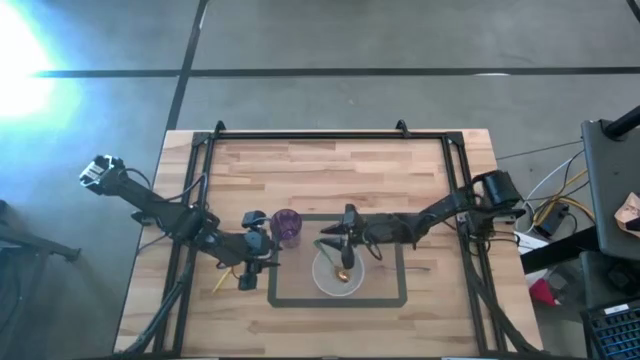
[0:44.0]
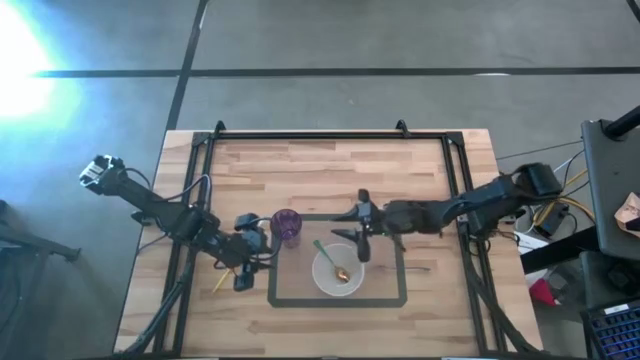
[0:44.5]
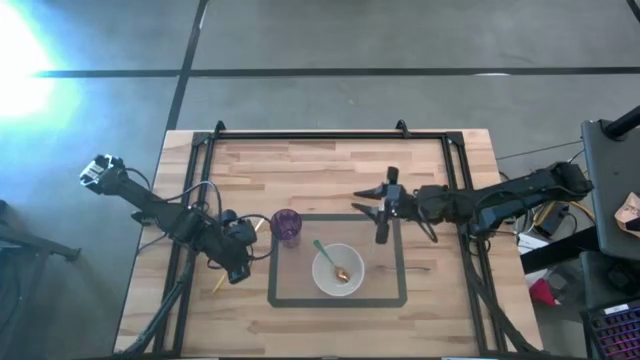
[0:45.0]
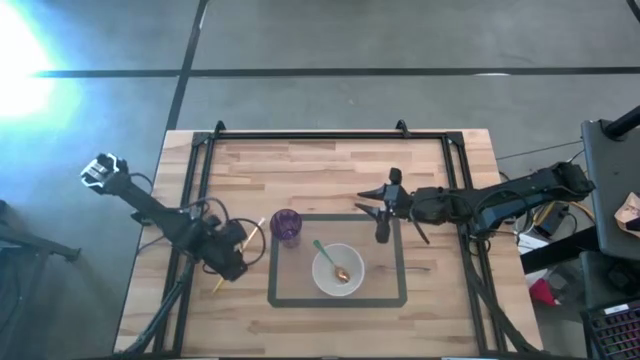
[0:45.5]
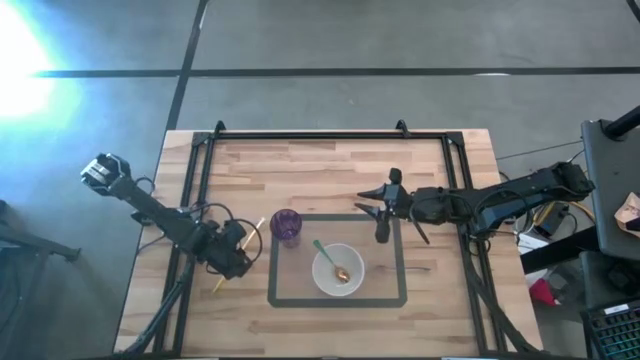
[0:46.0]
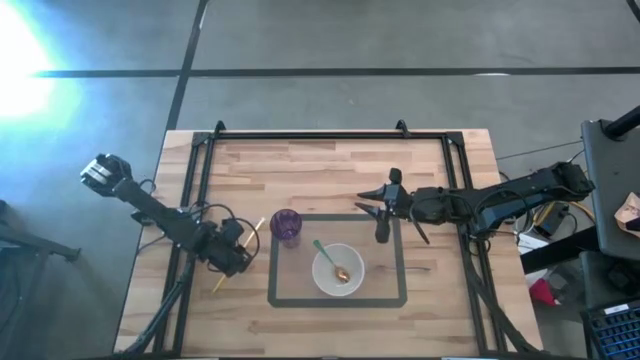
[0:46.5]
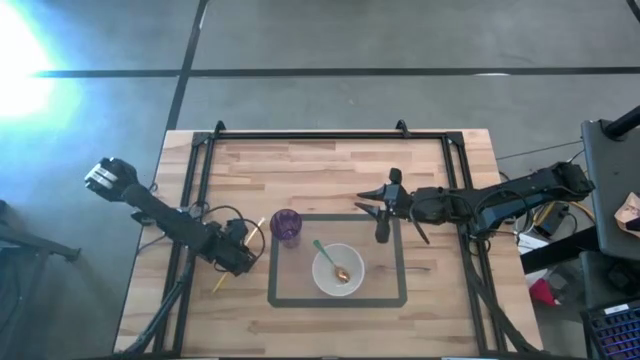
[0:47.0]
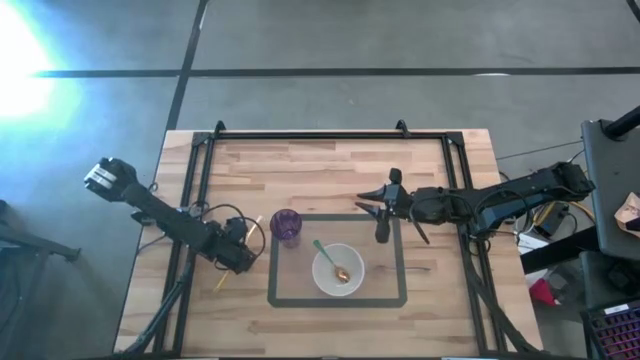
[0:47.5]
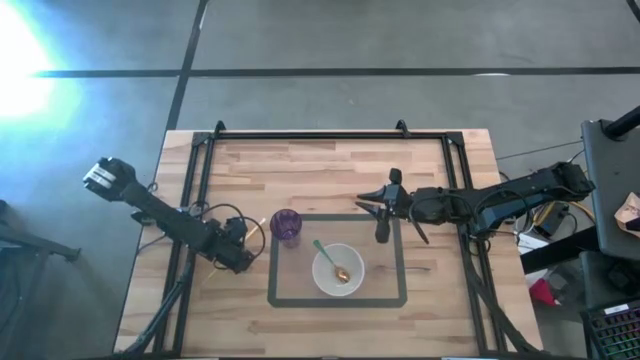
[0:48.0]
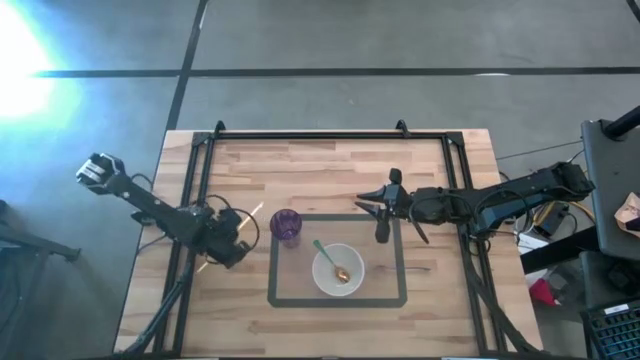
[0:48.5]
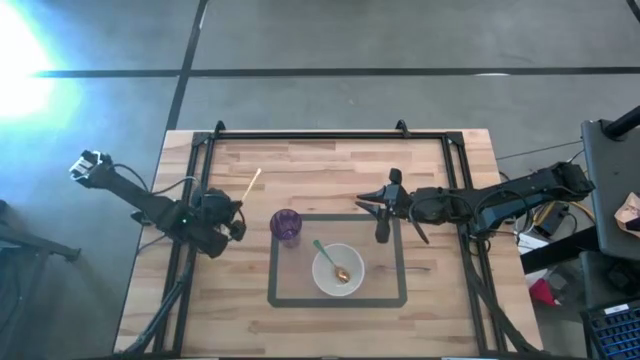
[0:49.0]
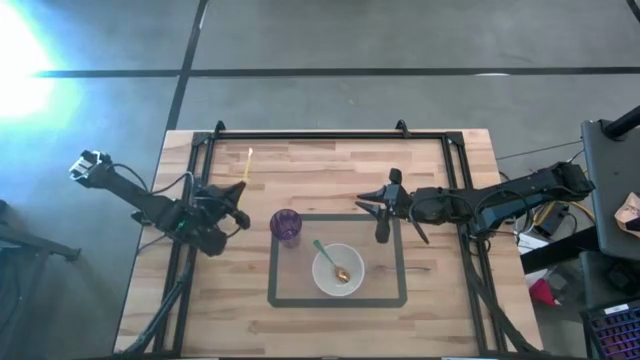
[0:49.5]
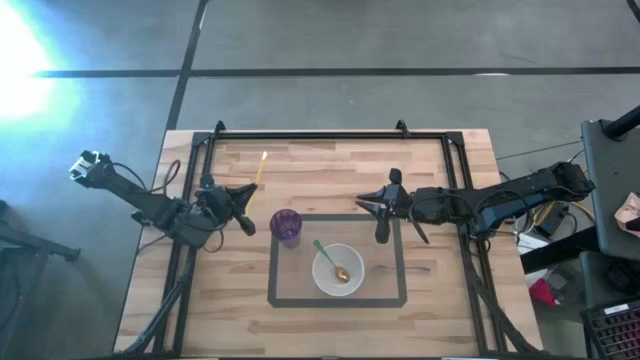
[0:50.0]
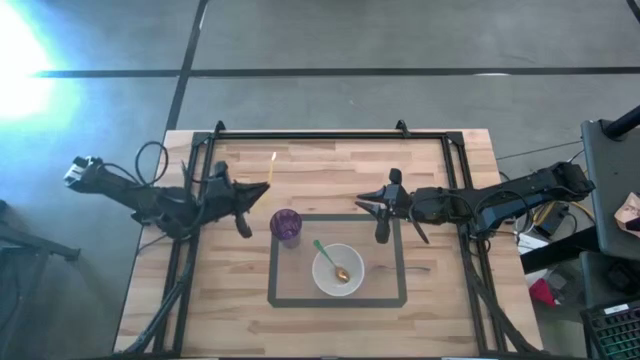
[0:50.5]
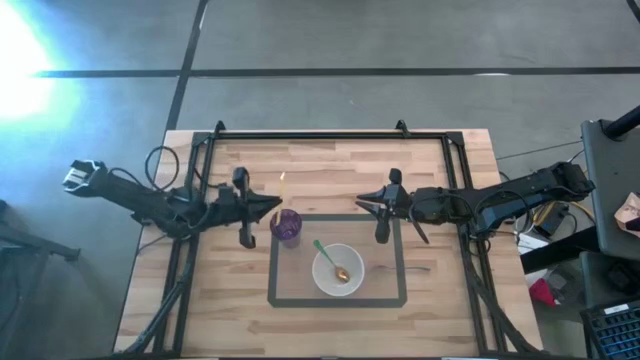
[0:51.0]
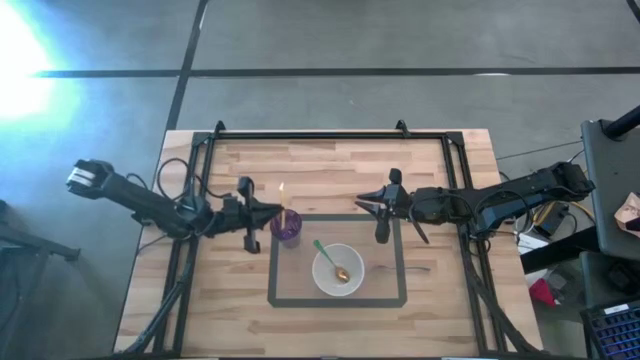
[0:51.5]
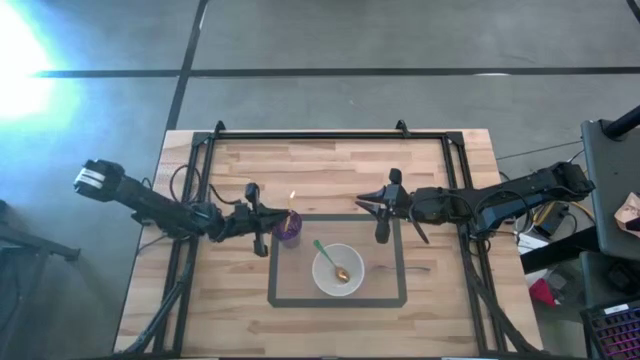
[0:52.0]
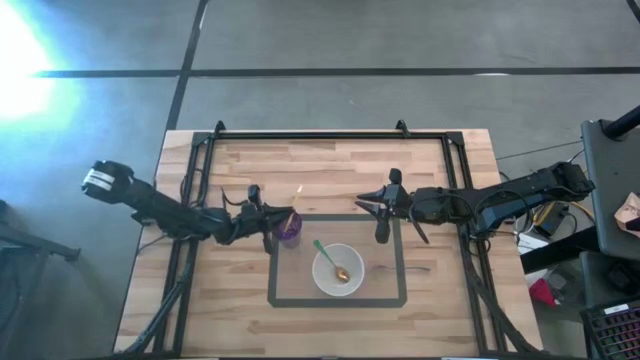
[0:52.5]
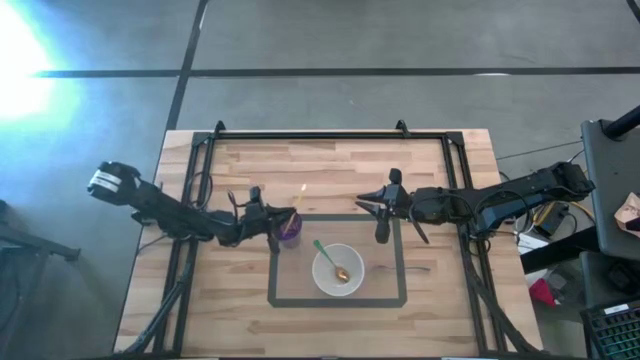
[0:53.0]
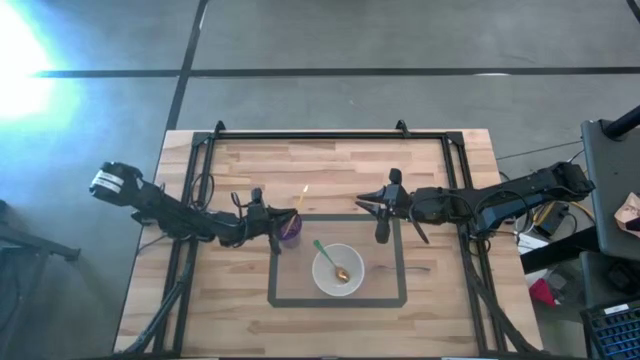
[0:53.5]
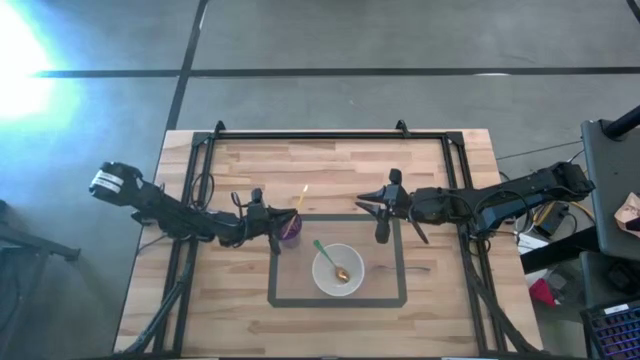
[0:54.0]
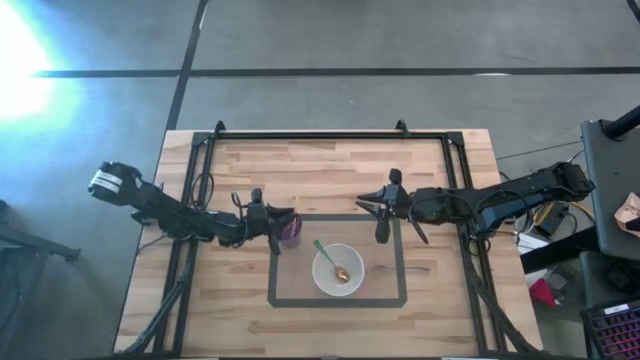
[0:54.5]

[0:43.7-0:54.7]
Task: Pick & Place Utensil
Put the yellow straw into the purple cup on the transparent mat

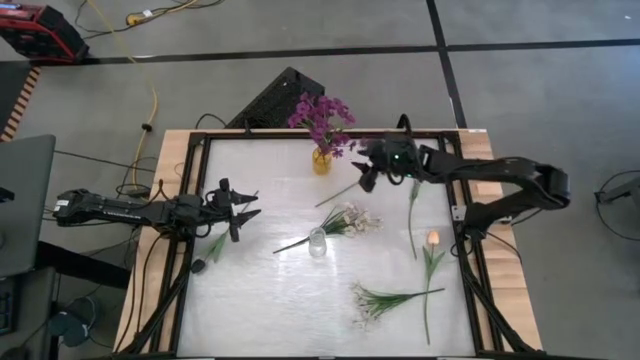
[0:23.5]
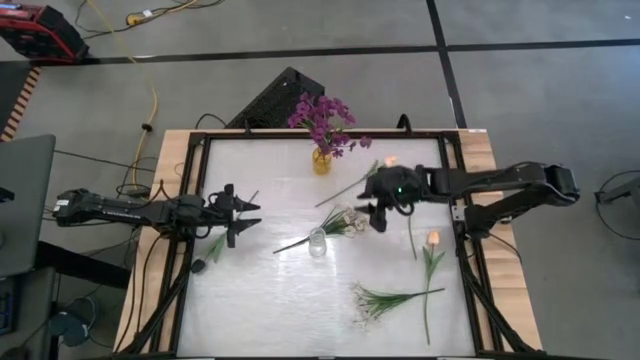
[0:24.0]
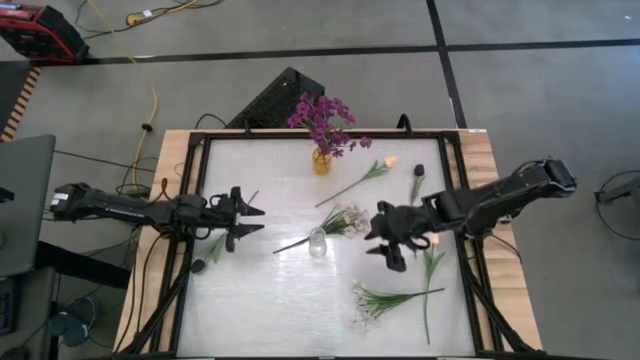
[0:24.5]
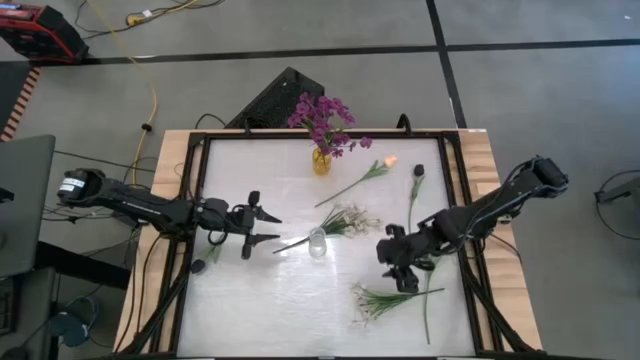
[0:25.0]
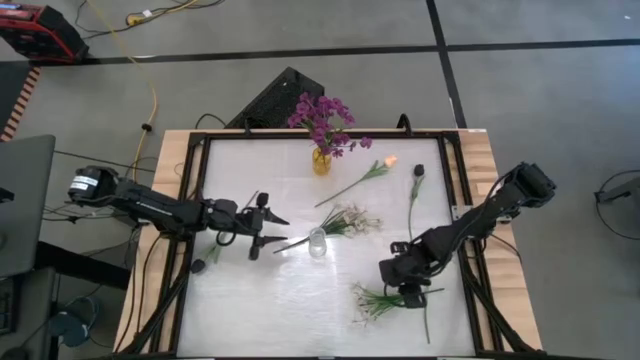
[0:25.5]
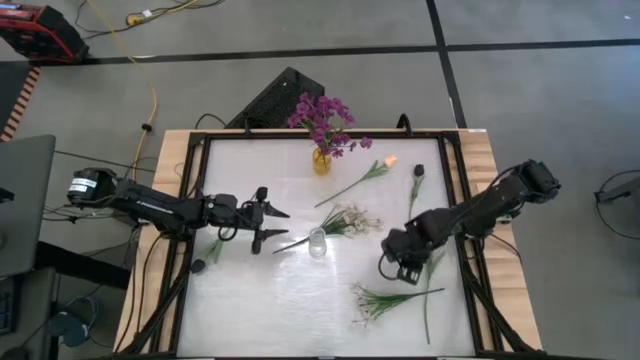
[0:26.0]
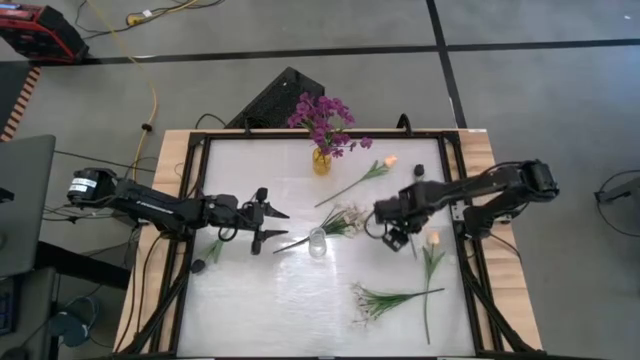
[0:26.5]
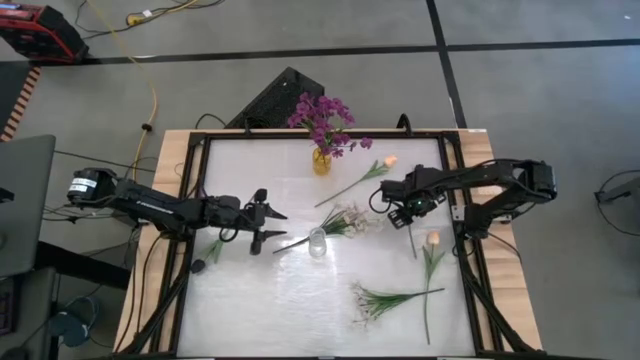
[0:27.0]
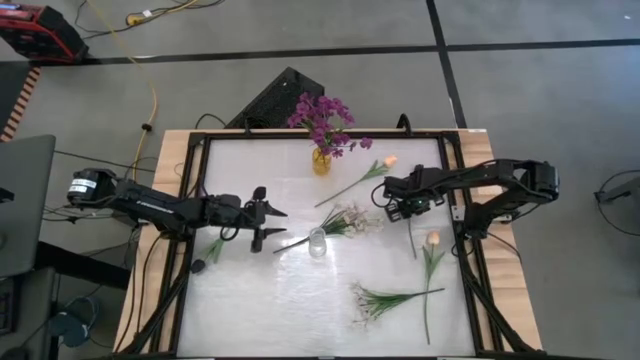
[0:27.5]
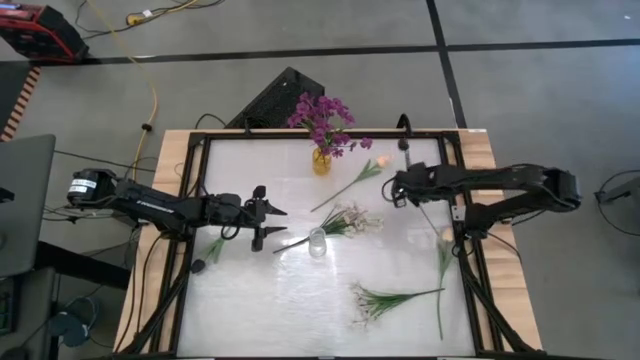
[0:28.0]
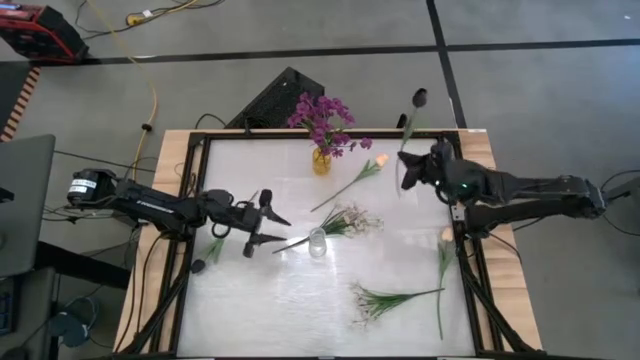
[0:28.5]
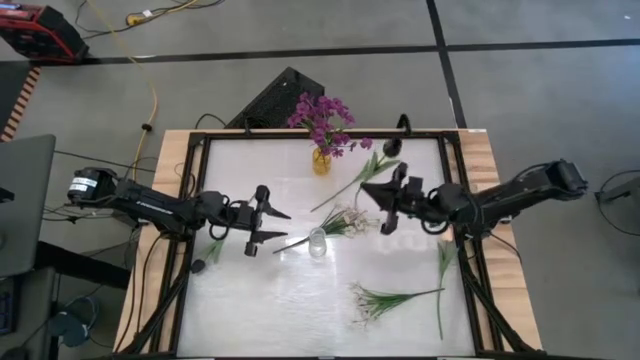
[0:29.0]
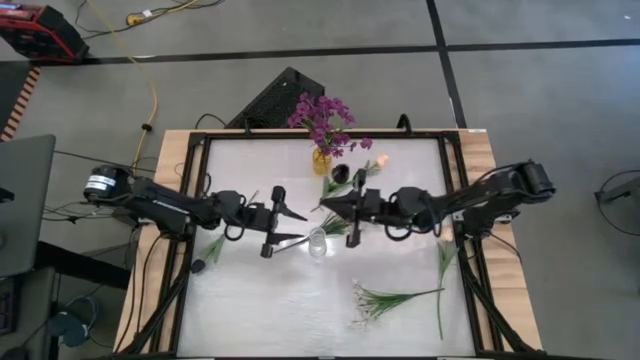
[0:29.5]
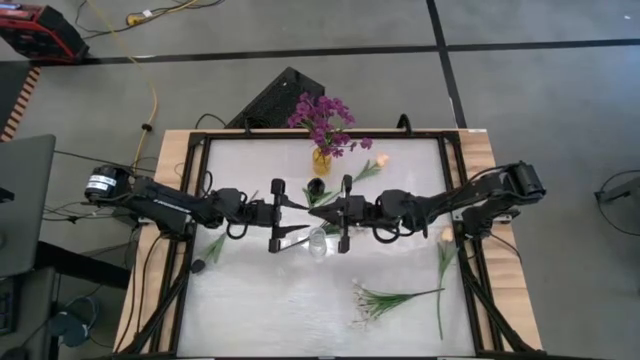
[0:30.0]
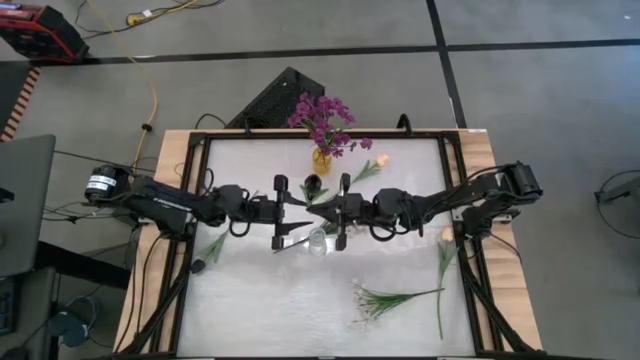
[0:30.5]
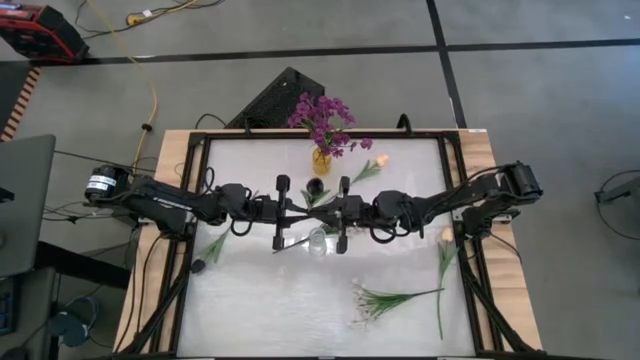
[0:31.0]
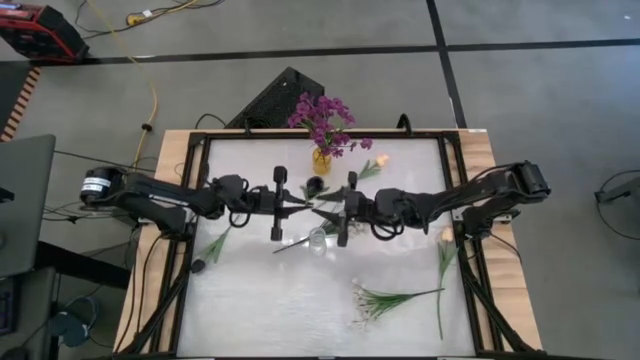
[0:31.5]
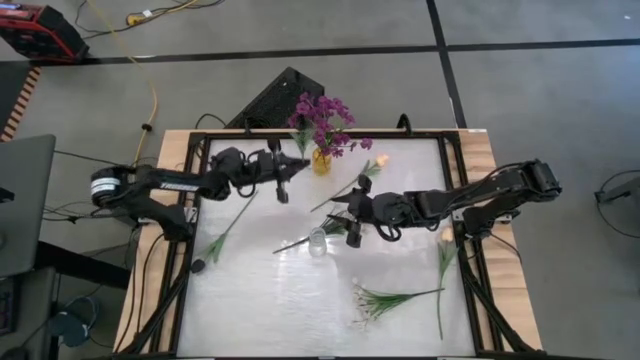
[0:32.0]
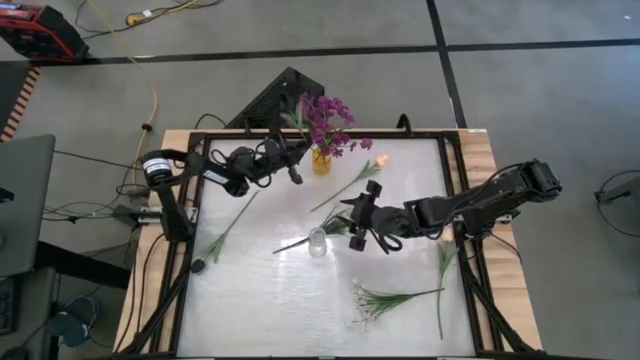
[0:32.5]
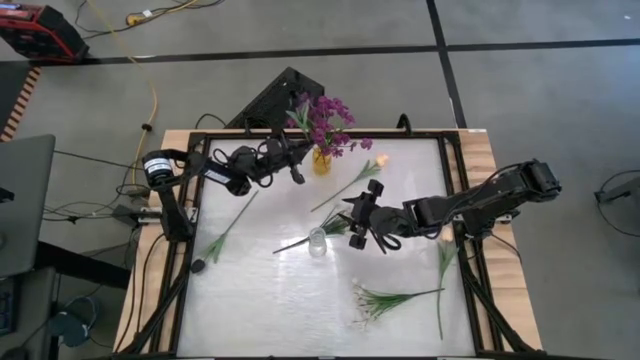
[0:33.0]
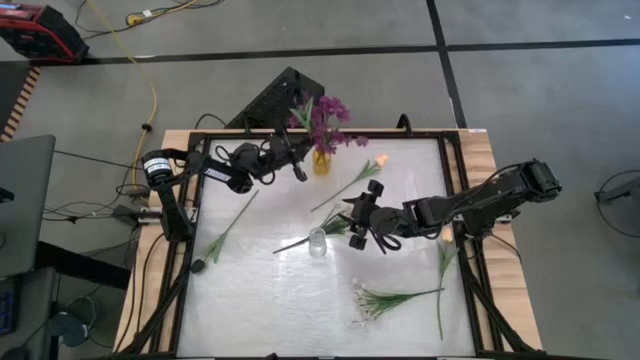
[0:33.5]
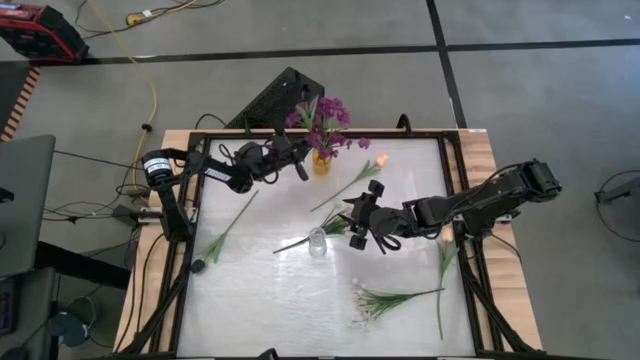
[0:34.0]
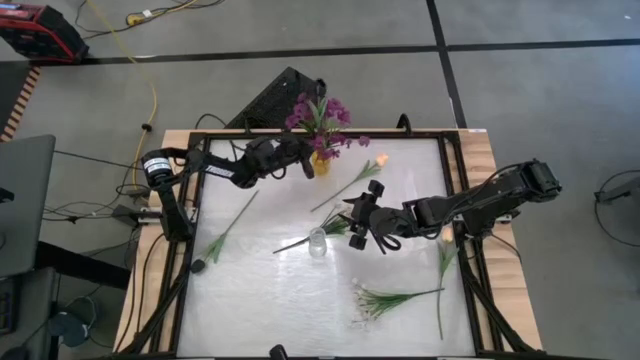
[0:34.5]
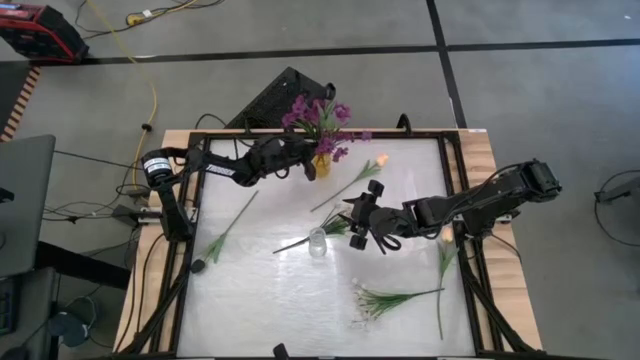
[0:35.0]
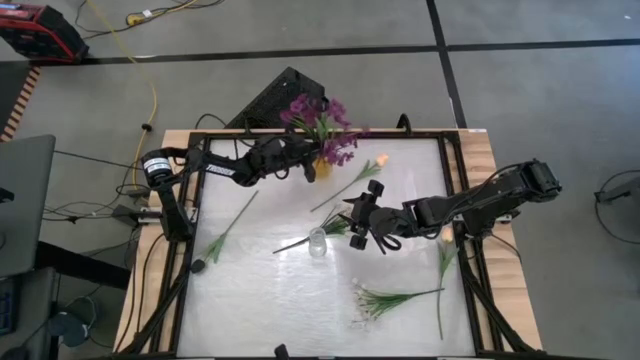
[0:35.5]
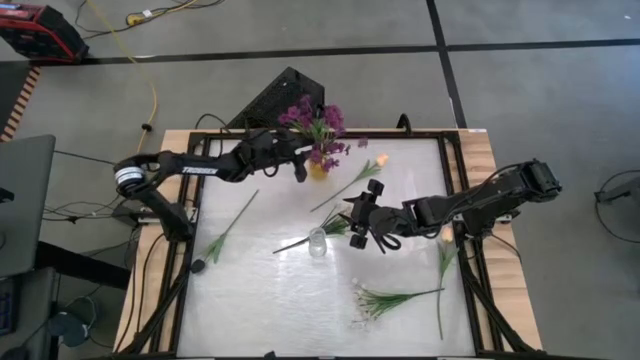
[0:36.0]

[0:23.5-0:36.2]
Task: Sort flowers into vase by color
Put the right black flower into the yellow vase
